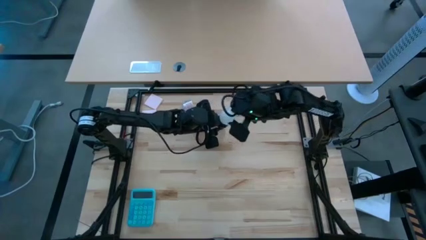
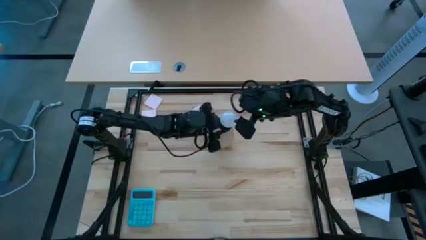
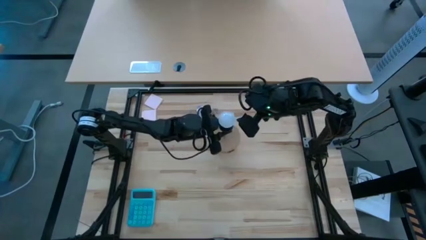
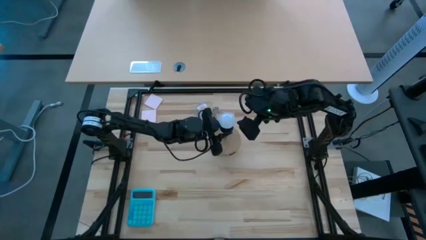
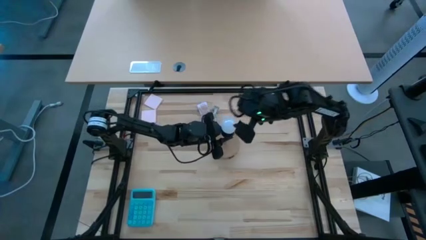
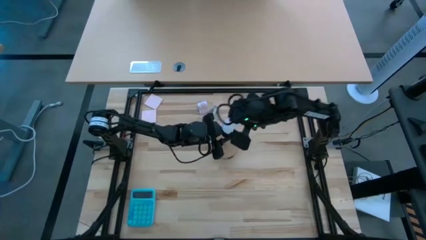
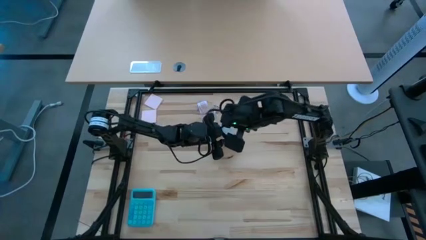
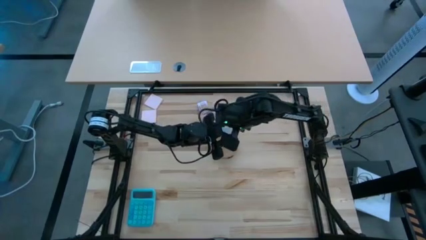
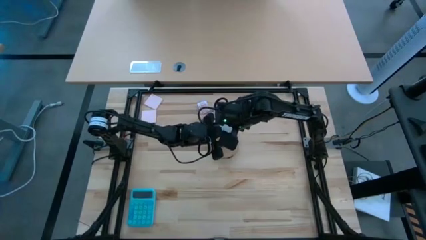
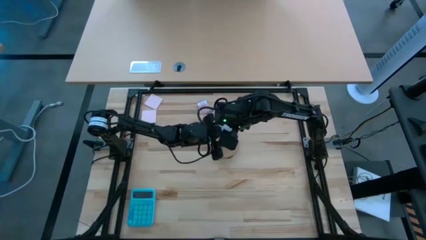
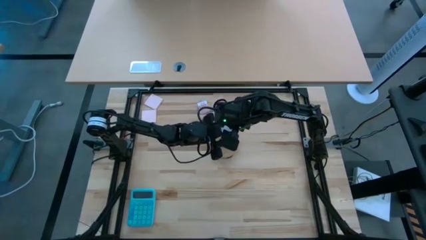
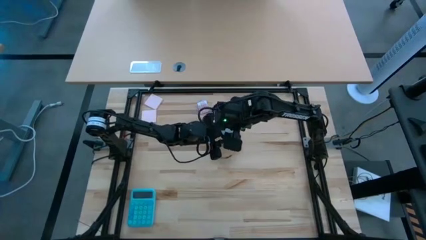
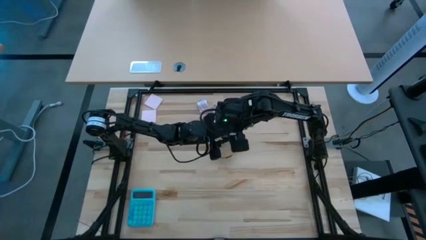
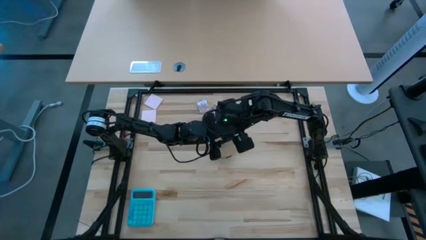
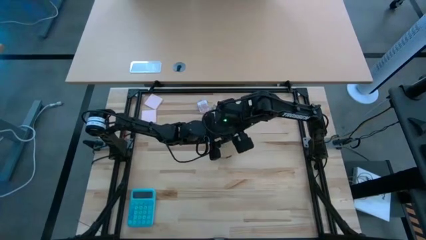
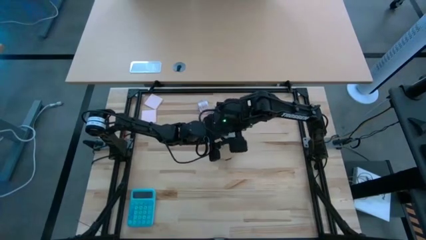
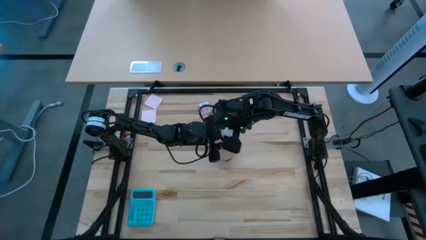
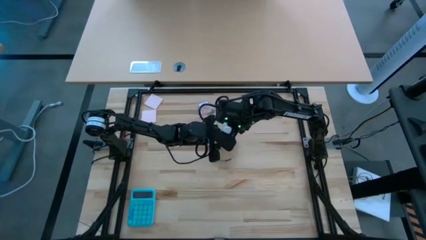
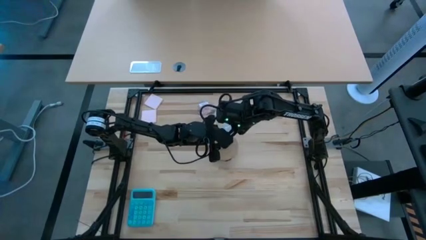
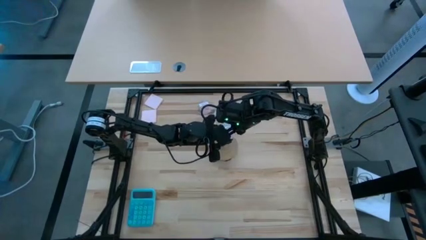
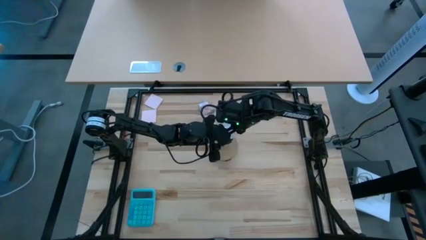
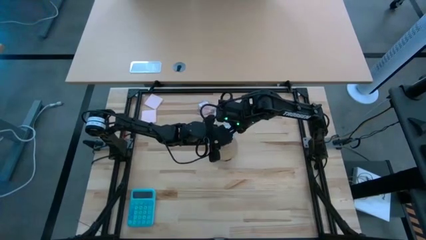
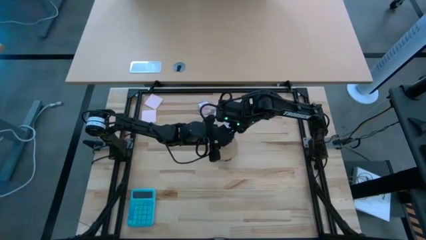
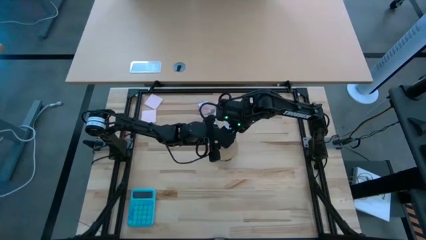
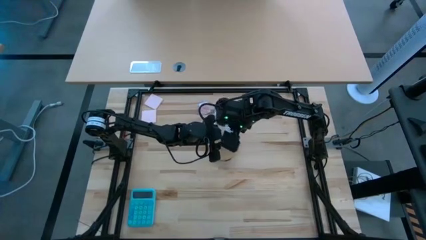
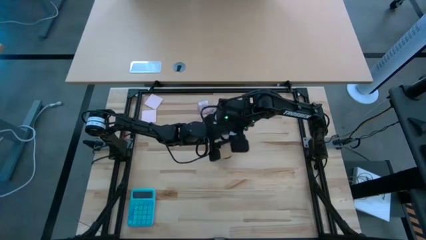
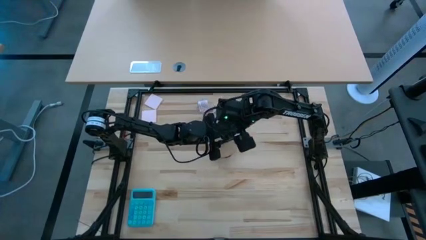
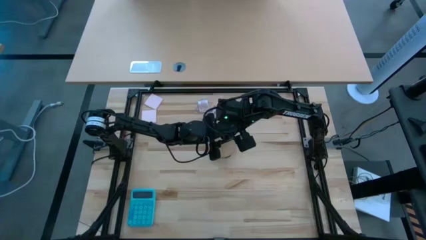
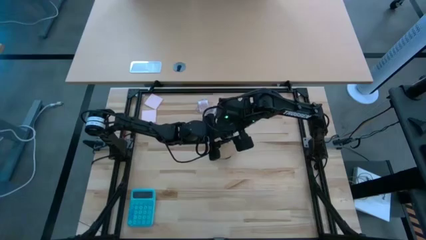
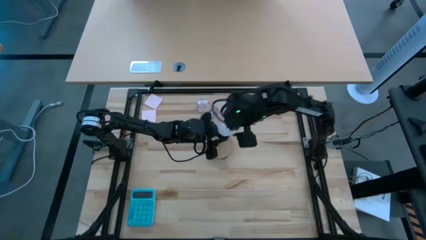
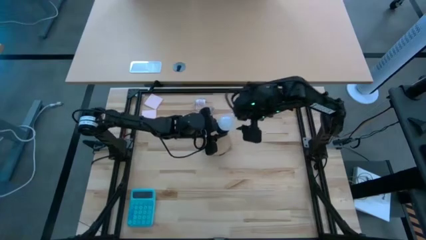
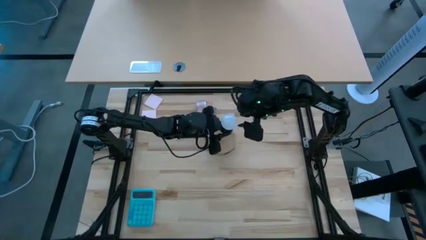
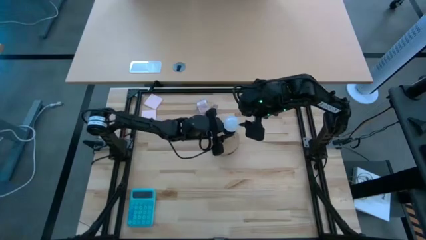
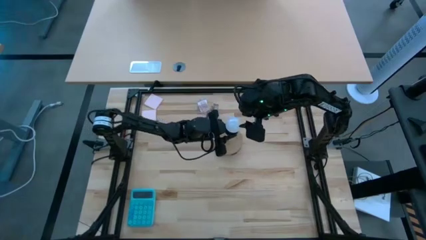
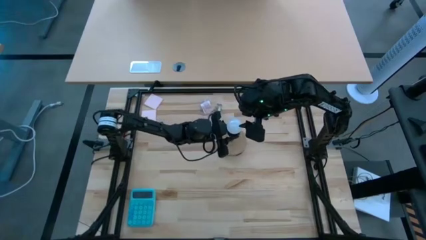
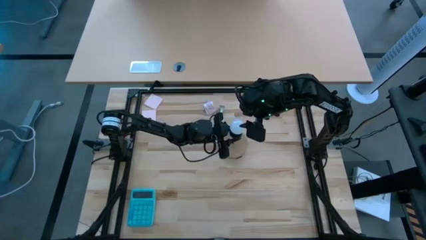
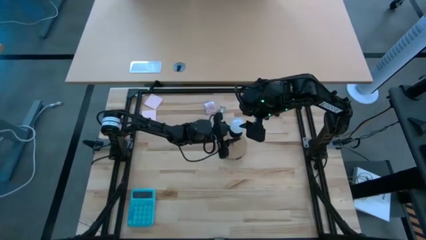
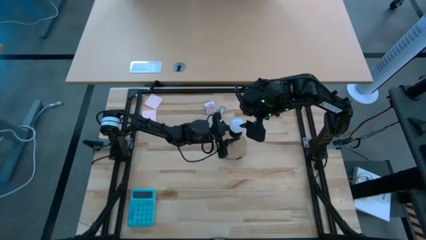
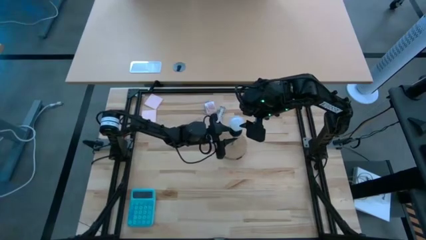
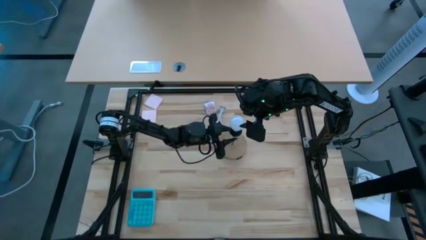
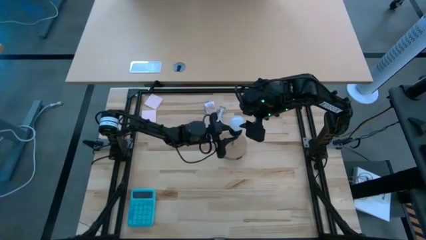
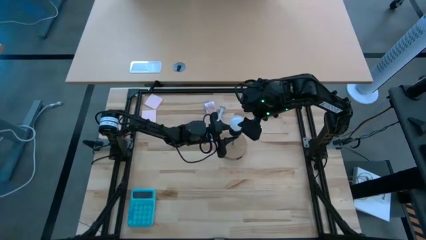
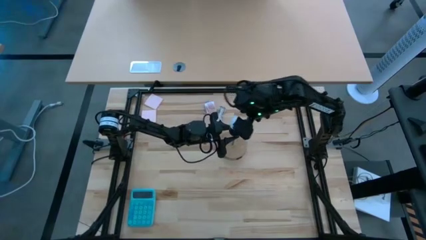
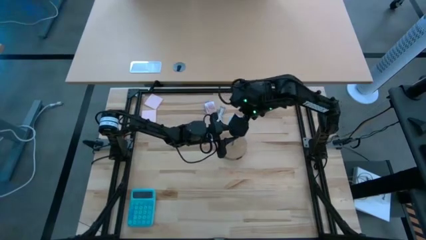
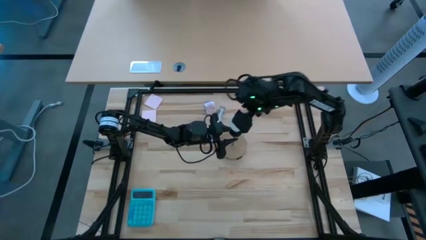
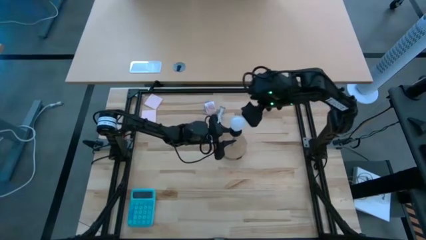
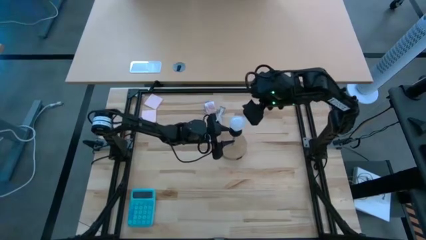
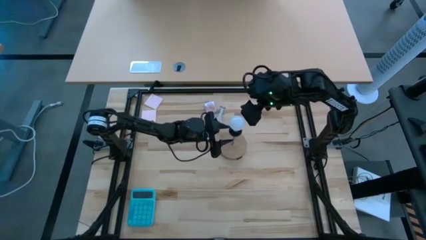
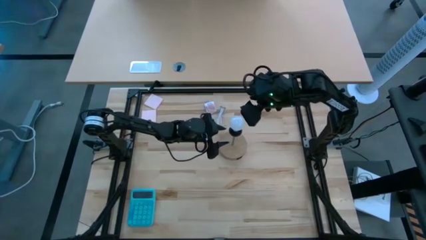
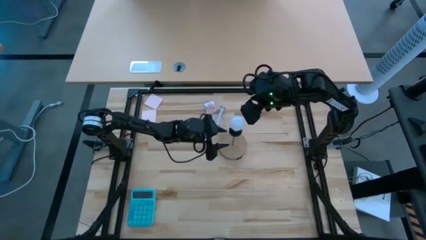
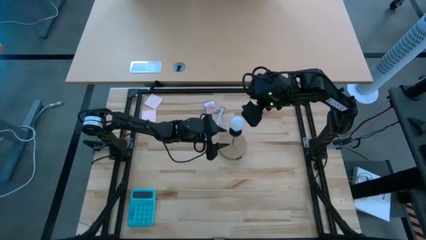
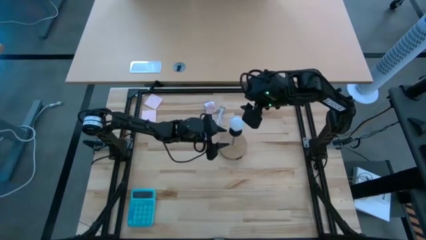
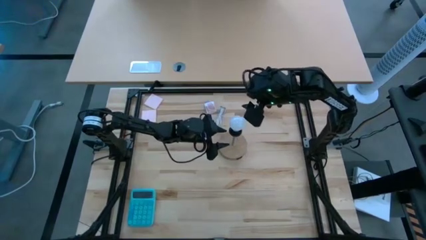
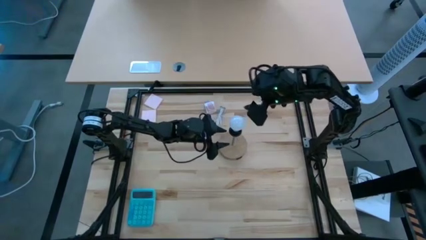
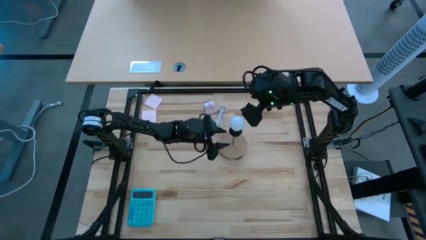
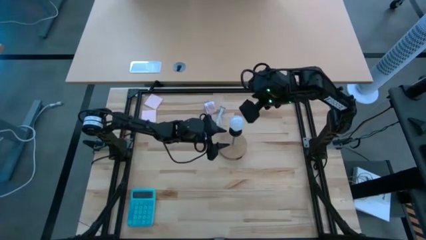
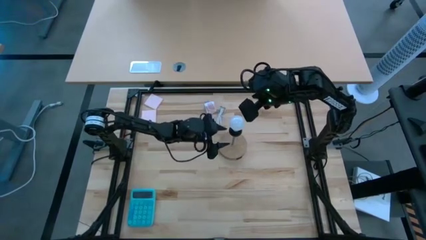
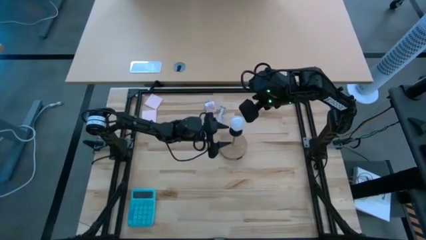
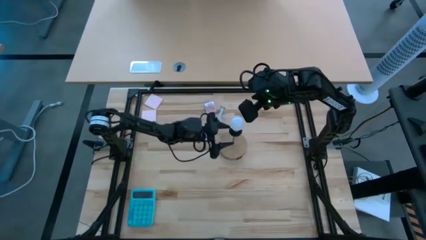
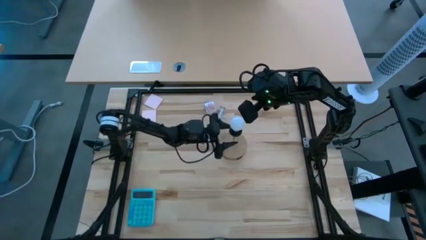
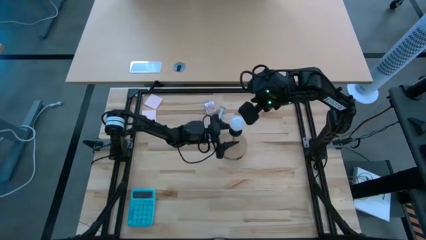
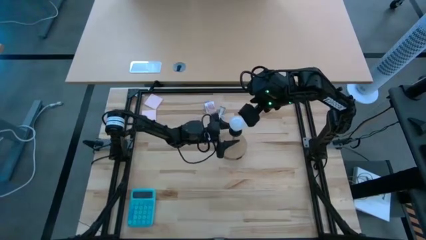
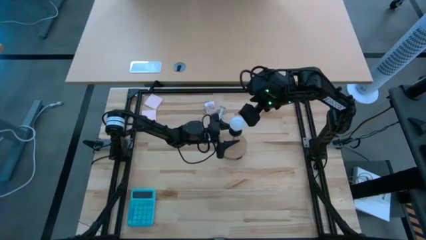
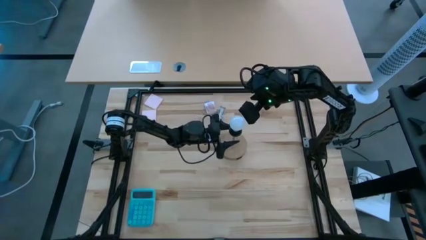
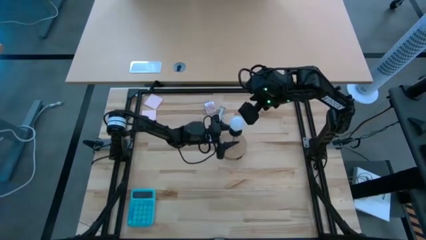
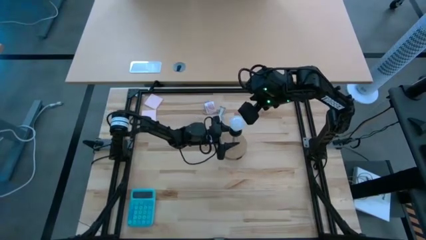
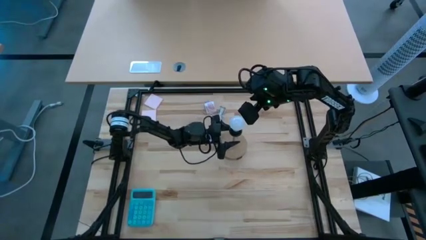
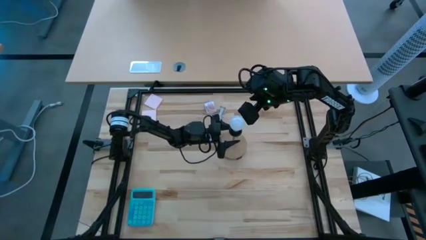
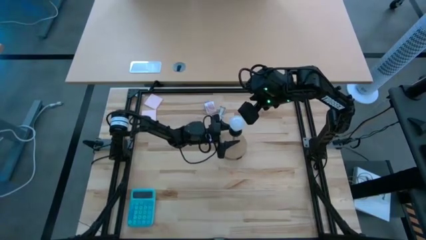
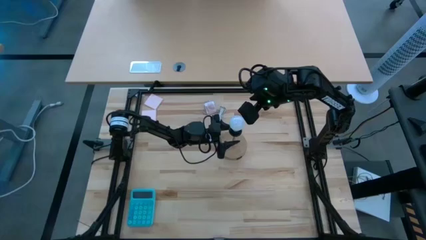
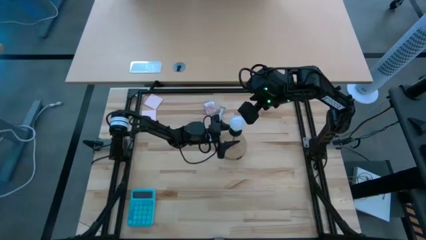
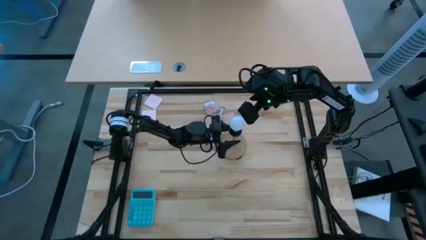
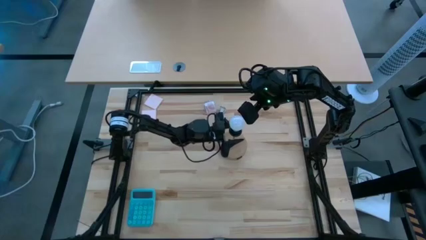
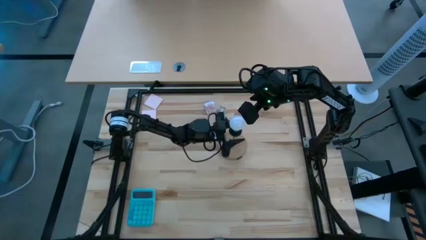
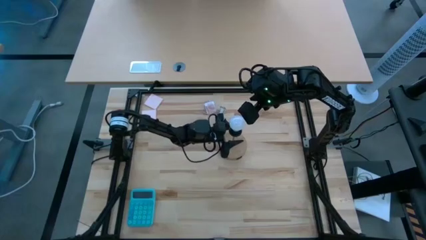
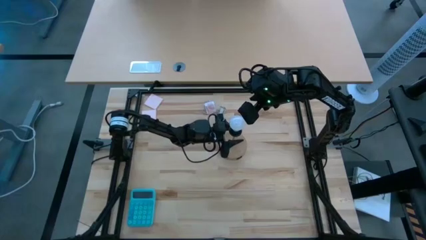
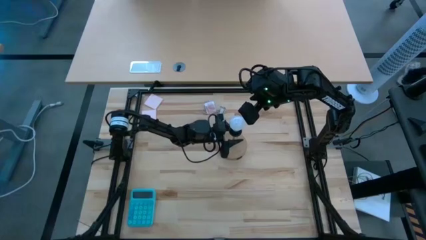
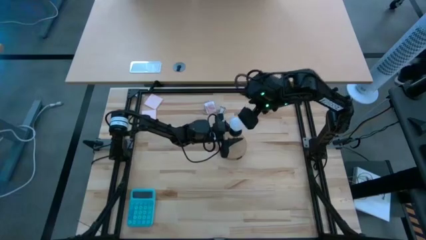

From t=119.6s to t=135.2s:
Task: Screw lightbulb
Remove the light bulb from the lamp
